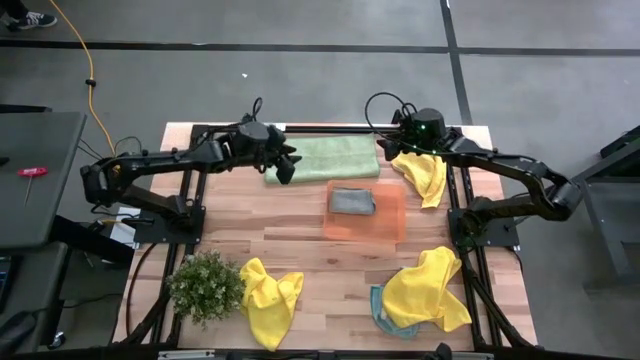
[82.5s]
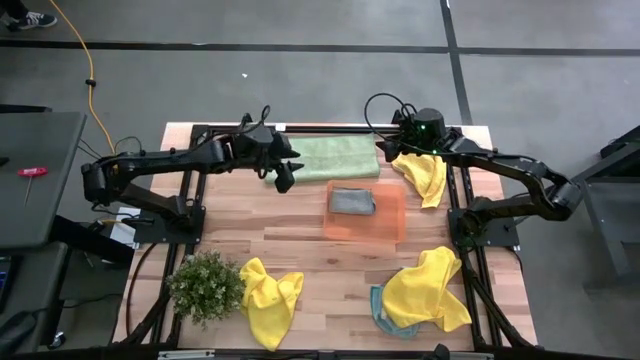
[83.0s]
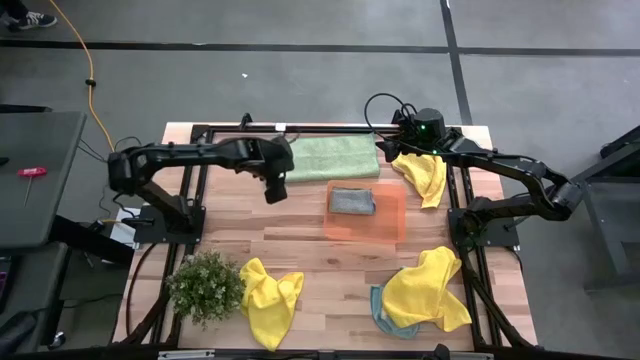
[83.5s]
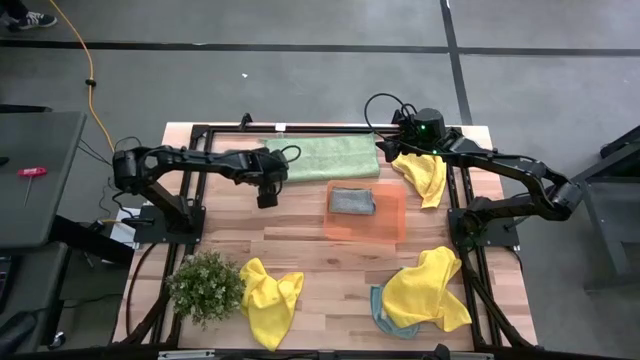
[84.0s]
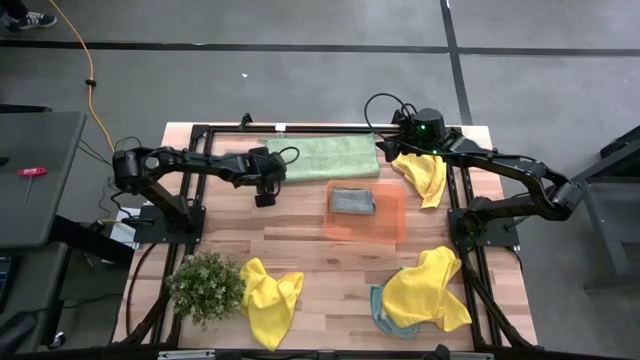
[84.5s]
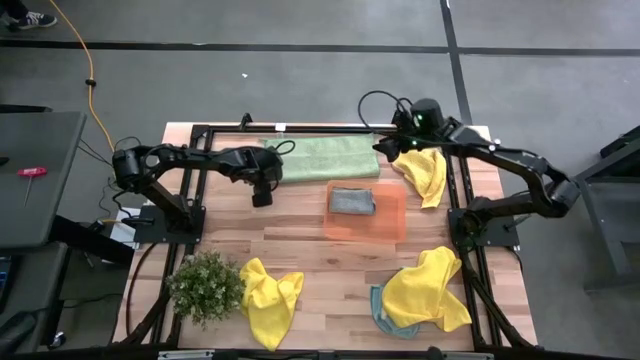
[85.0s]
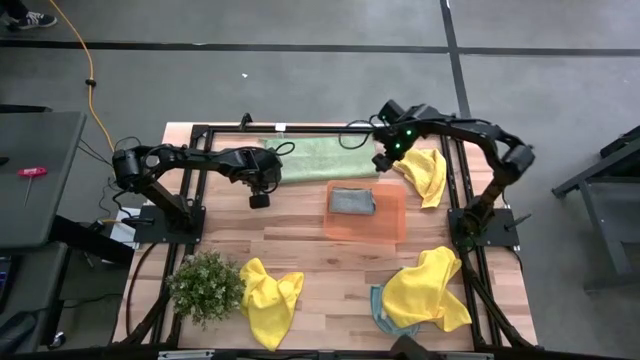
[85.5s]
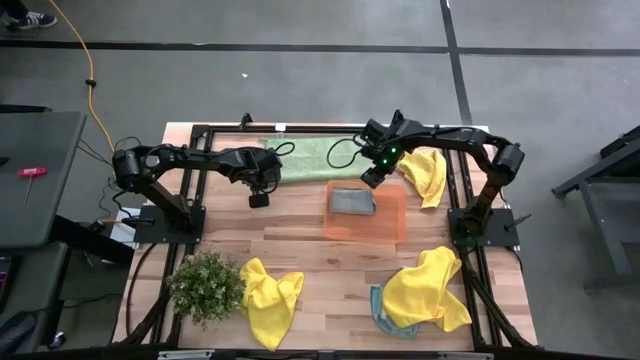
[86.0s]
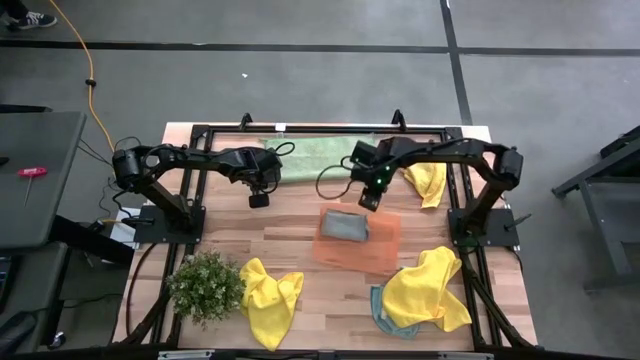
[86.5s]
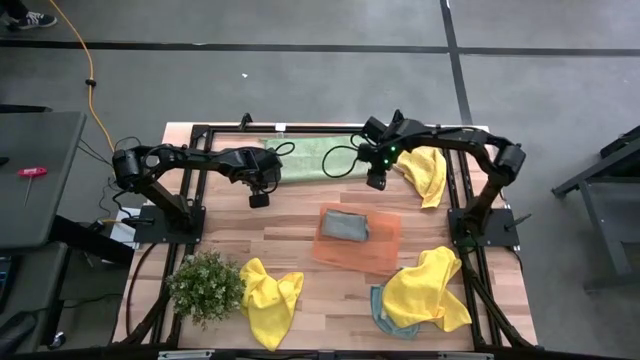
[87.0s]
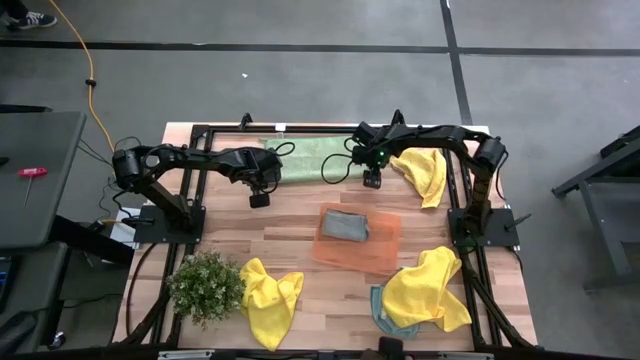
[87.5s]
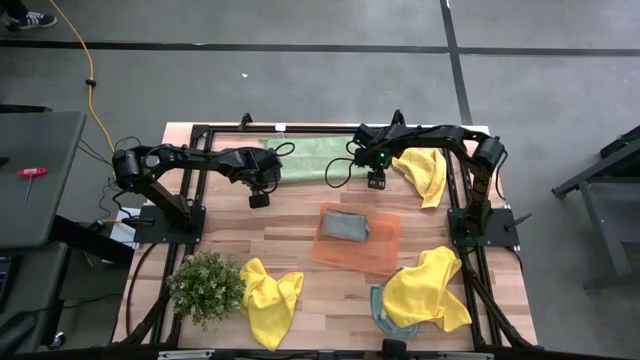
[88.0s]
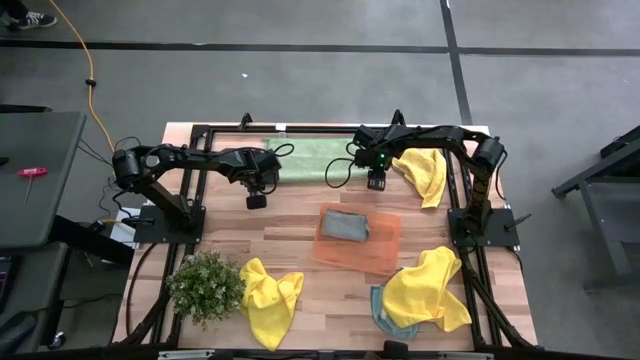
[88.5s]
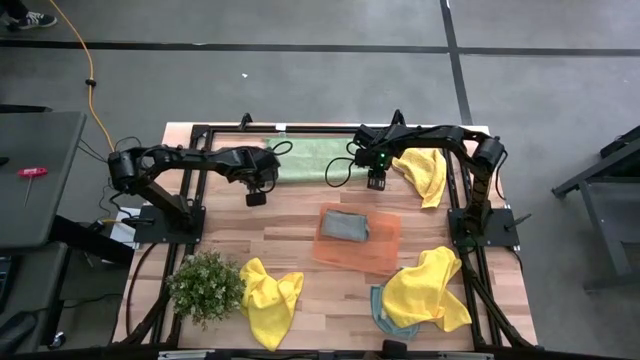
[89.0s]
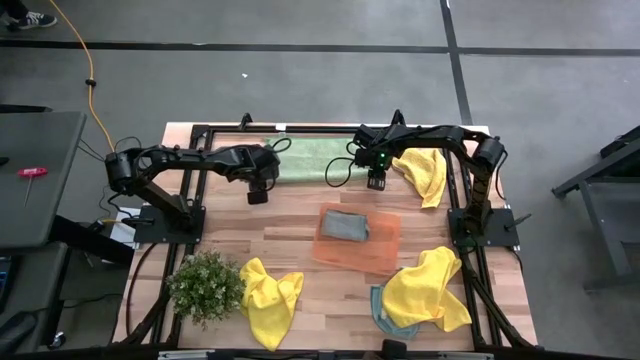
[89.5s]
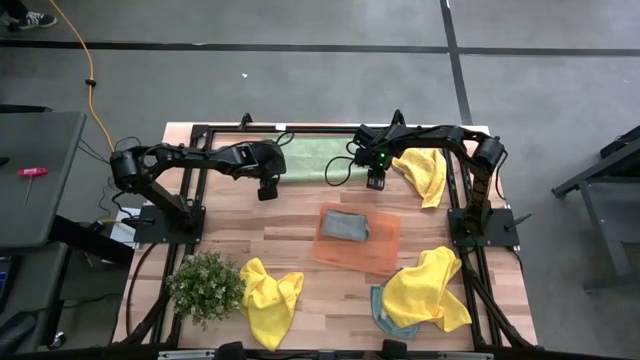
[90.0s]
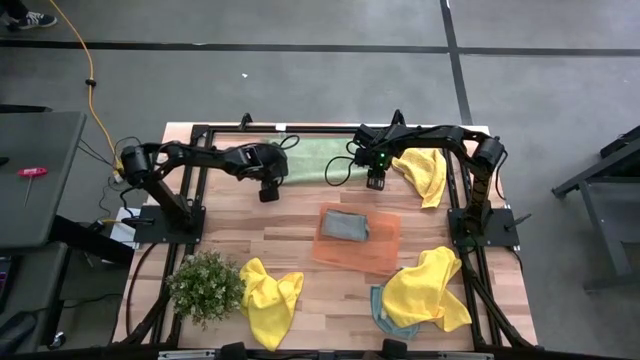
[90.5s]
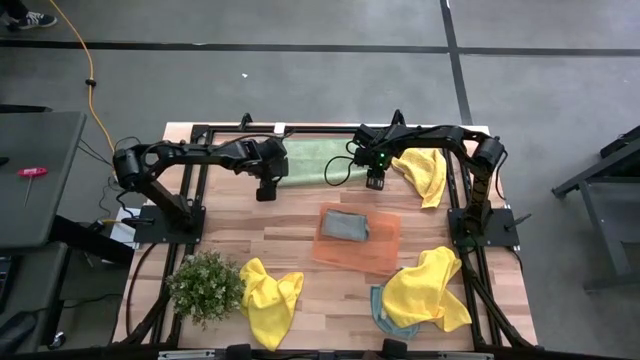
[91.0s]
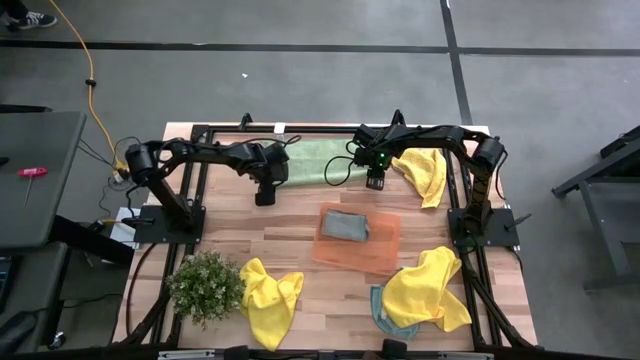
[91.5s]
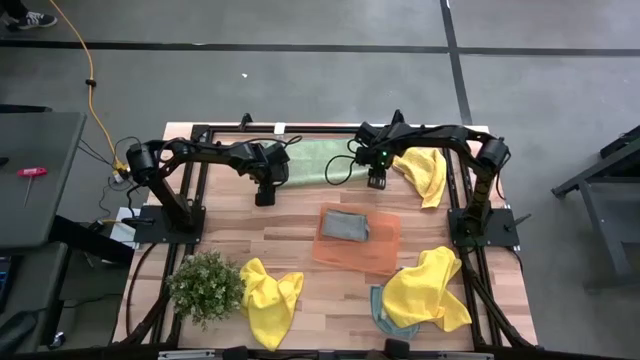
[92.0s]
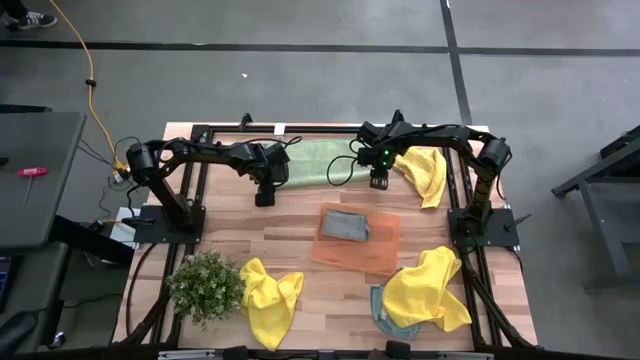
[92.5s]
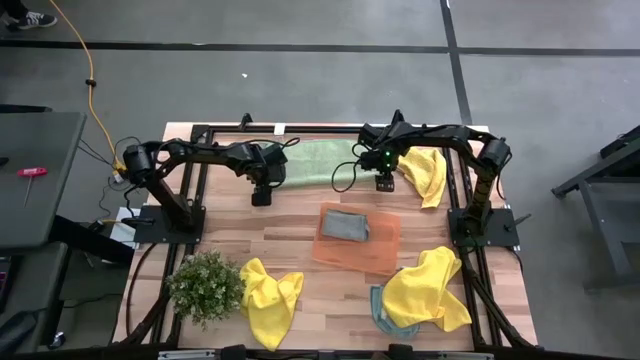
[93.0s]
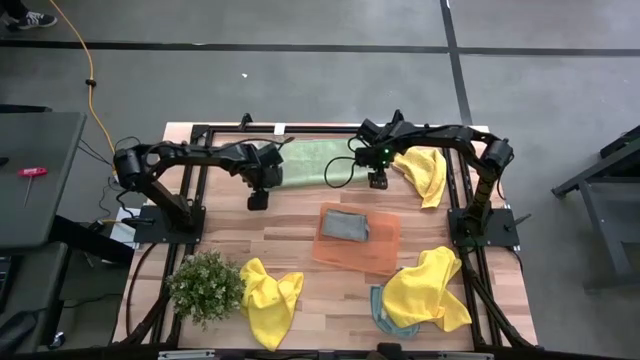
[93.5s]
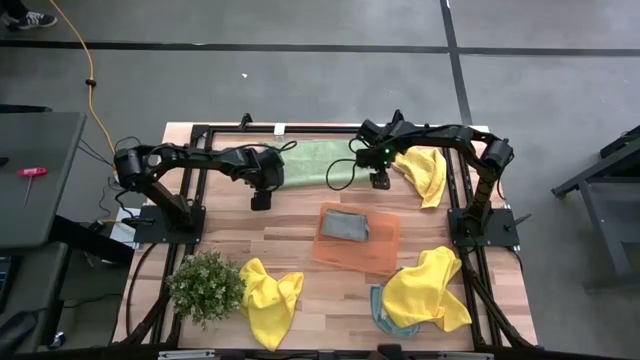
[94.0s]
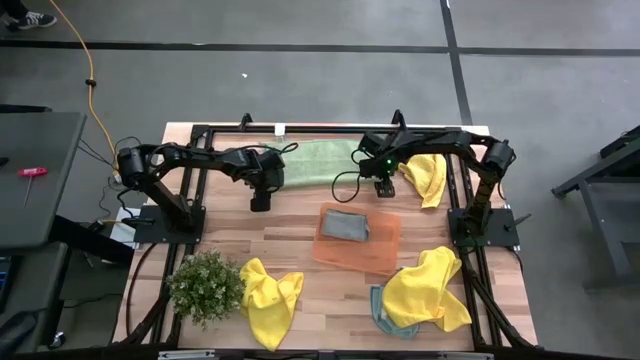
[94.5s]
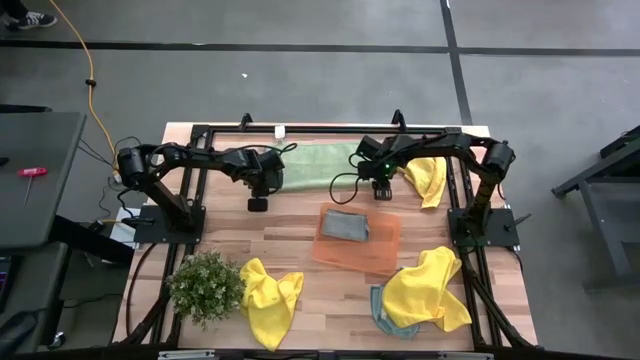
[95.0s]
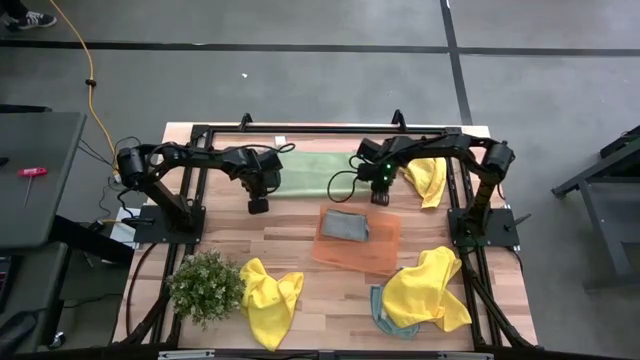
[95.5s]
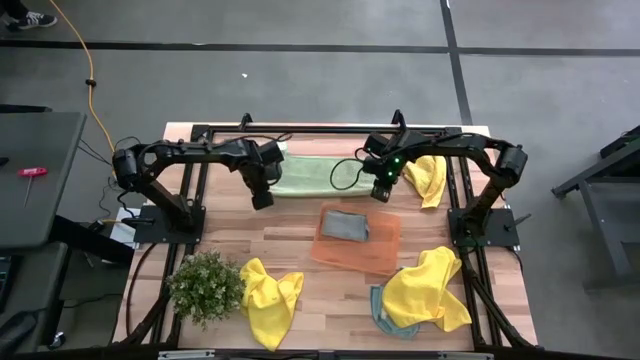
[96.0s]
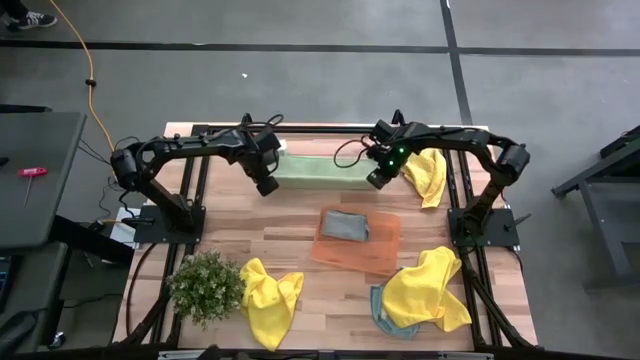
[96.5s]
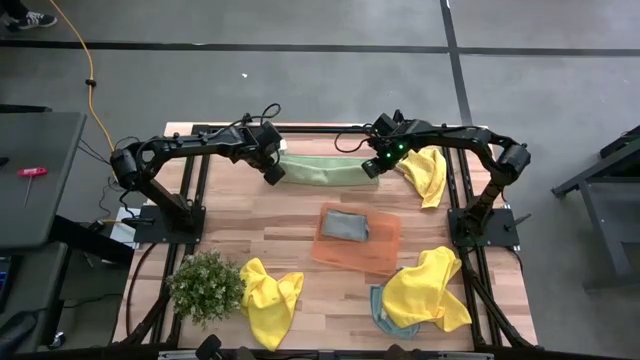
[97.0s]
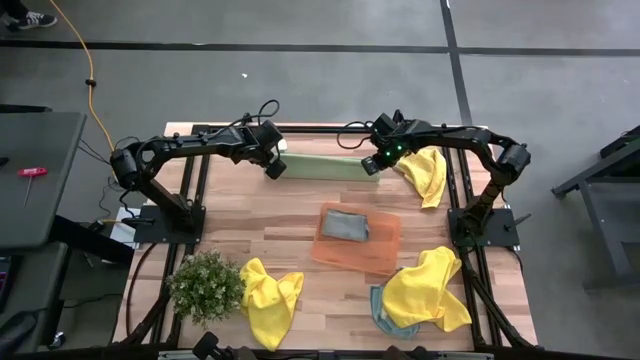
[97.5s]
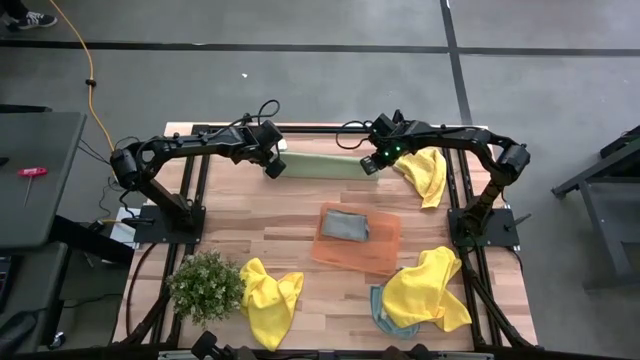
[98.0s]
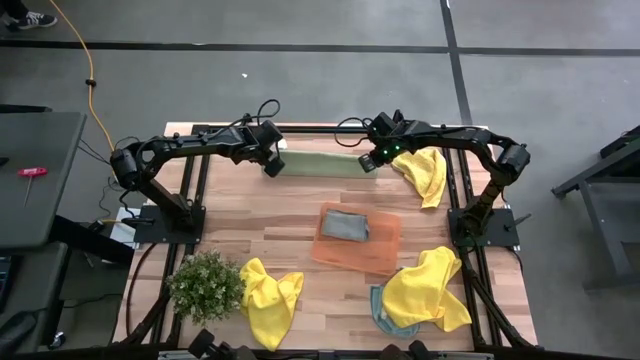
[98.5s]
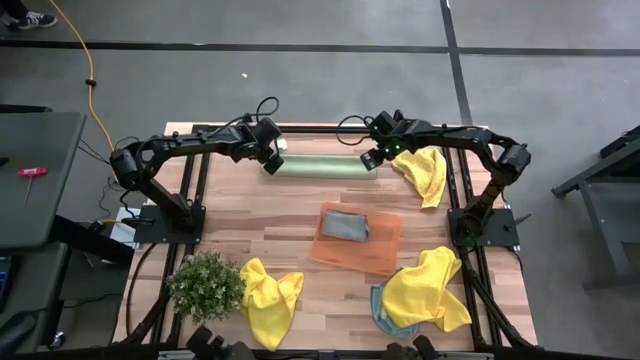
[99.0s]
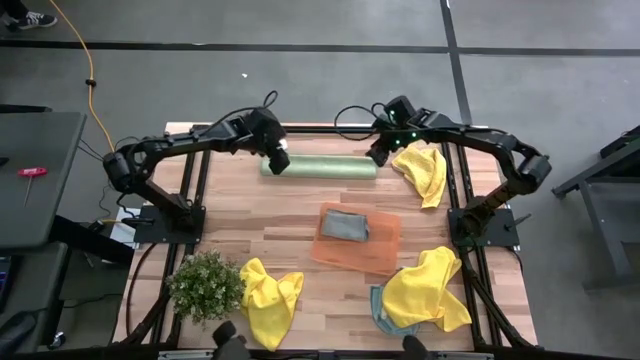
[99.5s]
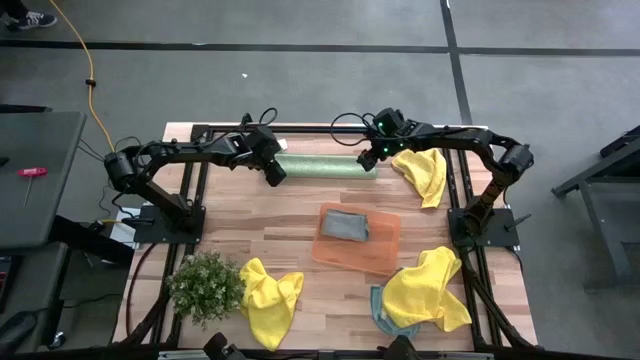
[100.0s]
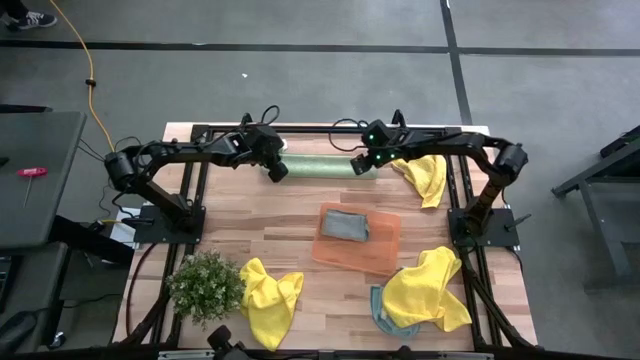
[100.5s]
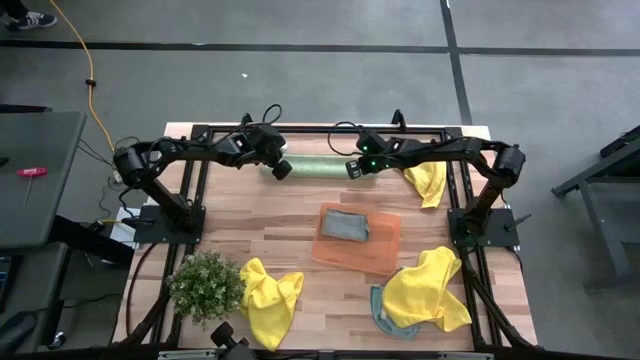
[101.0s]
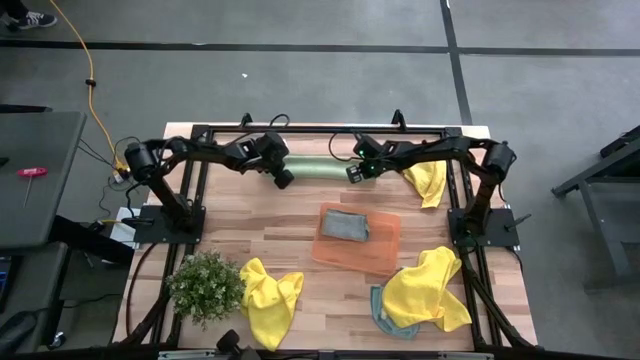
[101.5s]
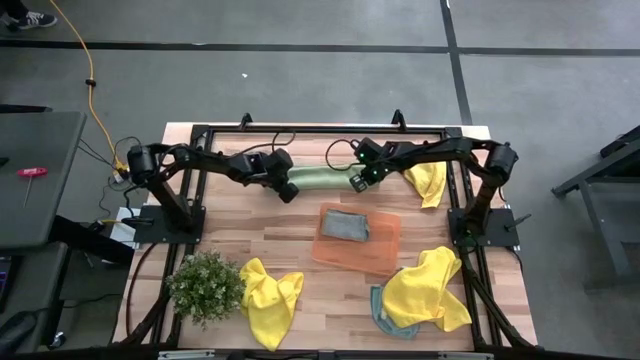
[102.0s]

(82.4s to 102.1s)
Task: Fold microfiber towels
Fold the green microfiber towel
